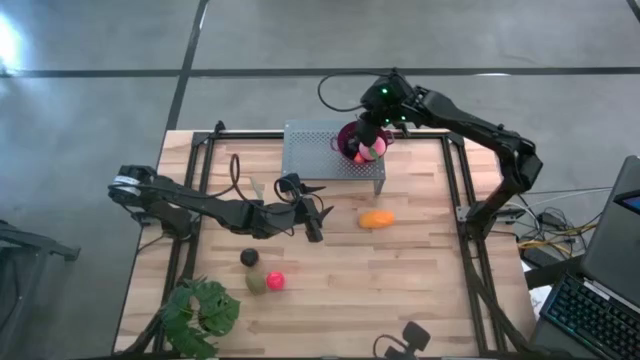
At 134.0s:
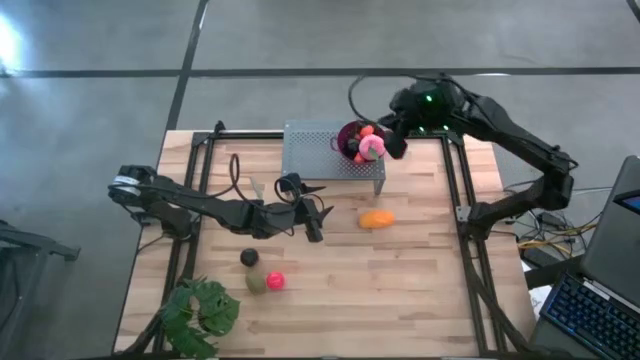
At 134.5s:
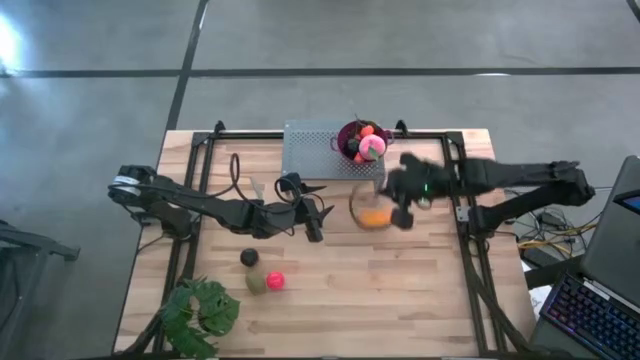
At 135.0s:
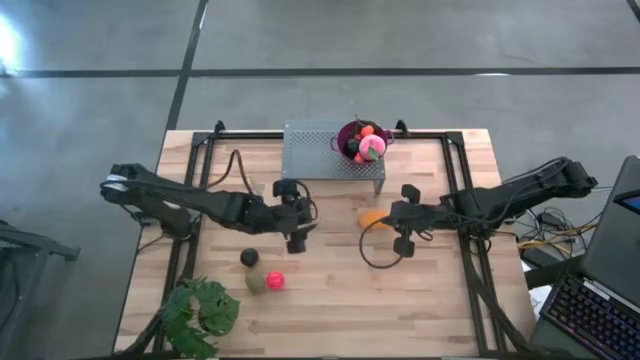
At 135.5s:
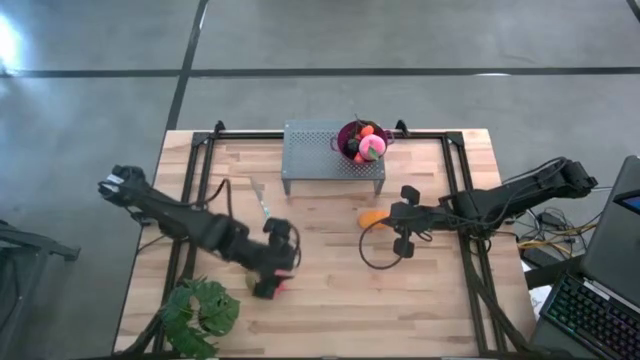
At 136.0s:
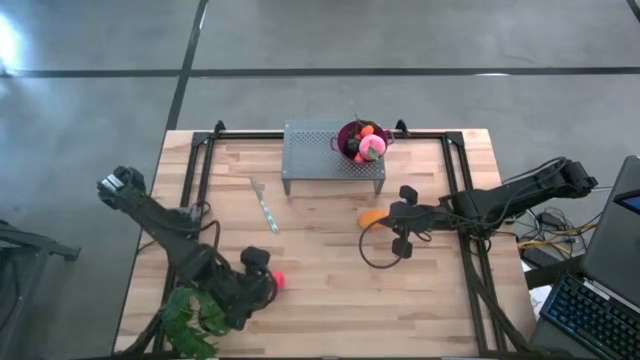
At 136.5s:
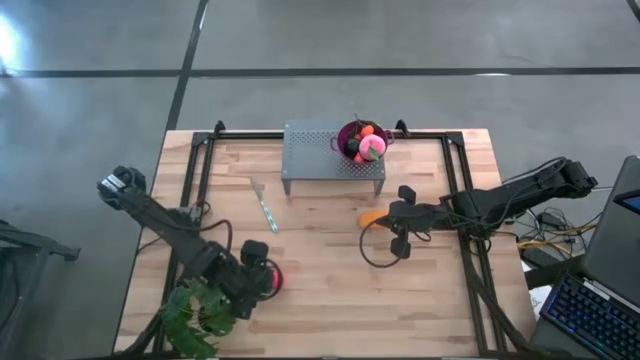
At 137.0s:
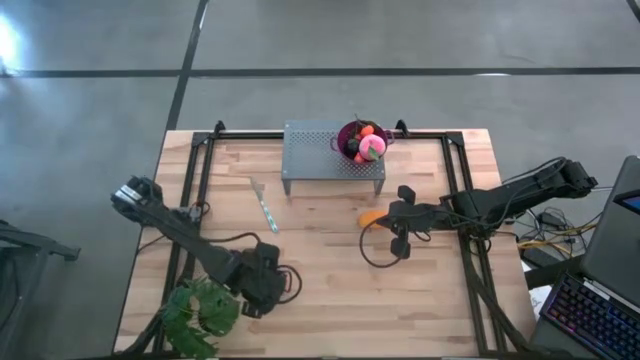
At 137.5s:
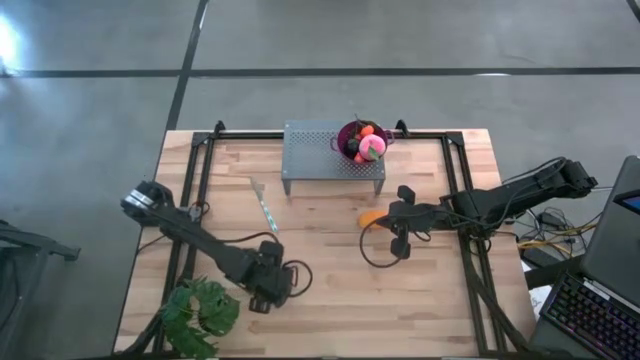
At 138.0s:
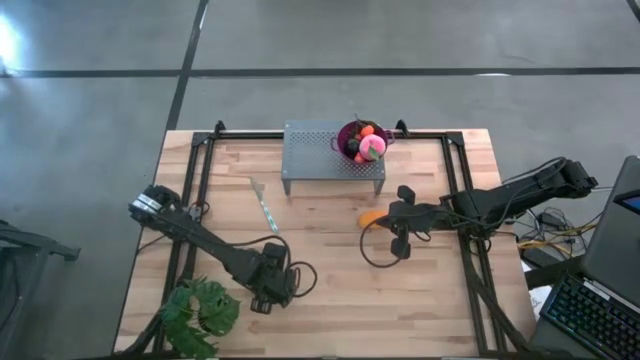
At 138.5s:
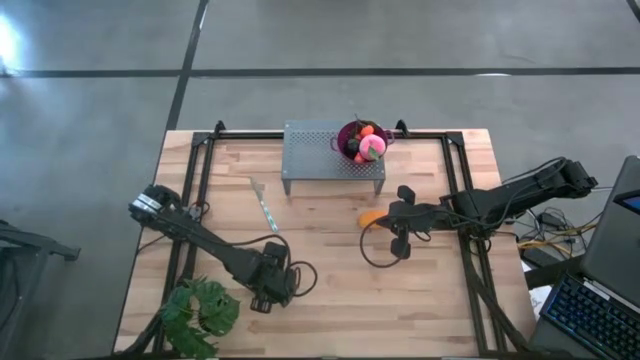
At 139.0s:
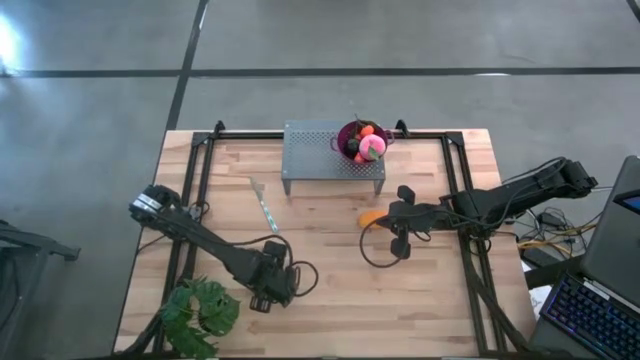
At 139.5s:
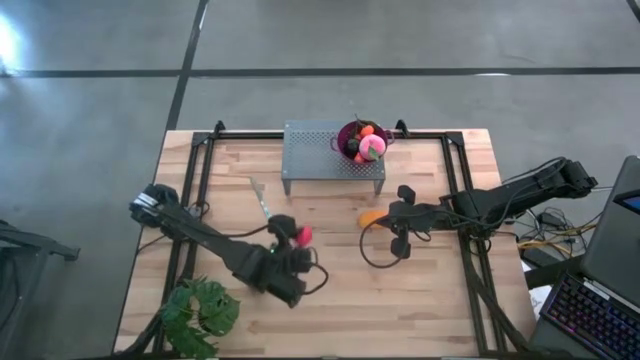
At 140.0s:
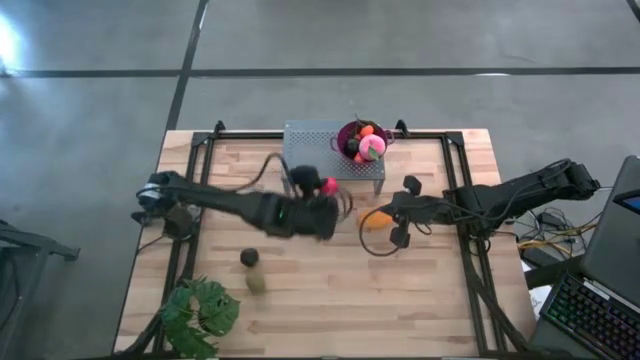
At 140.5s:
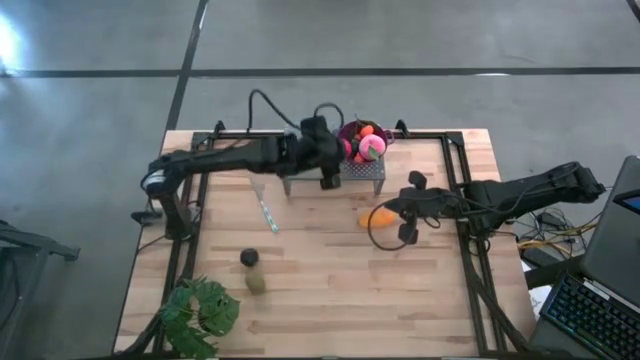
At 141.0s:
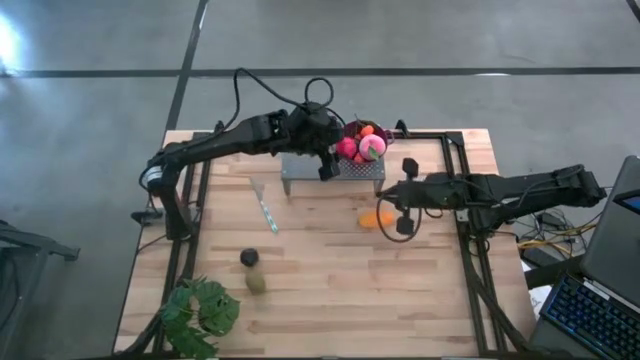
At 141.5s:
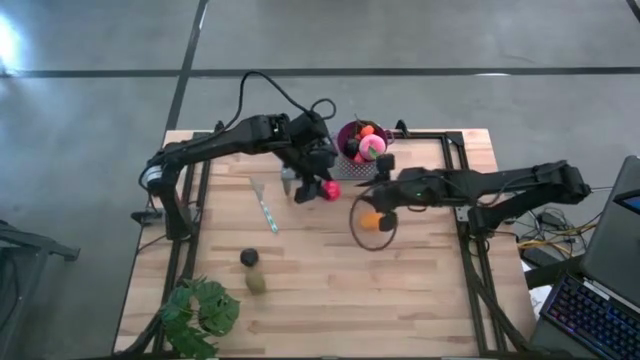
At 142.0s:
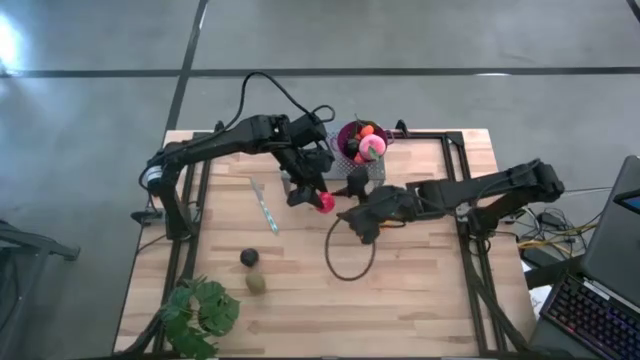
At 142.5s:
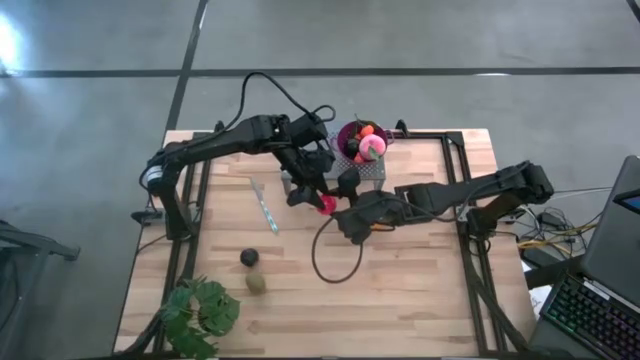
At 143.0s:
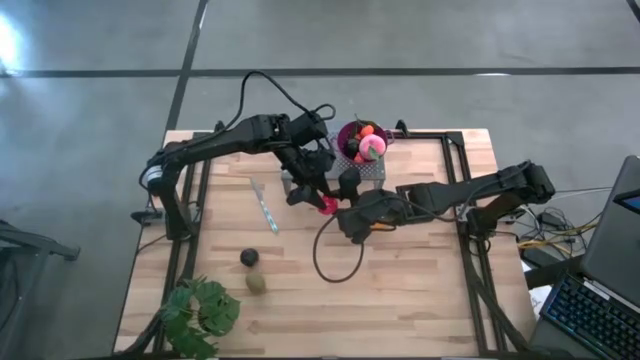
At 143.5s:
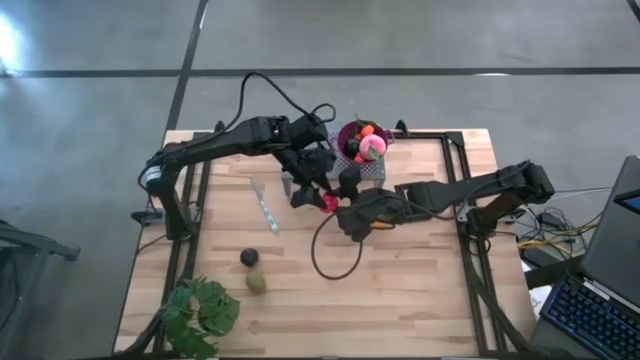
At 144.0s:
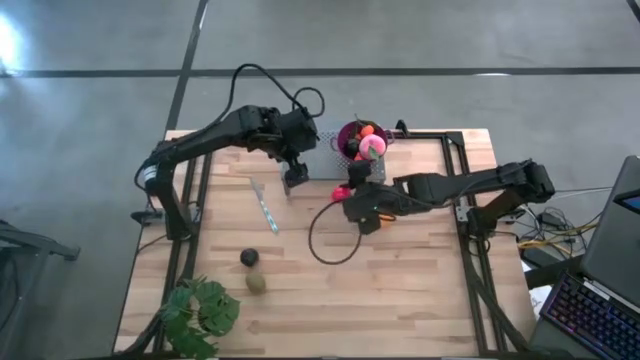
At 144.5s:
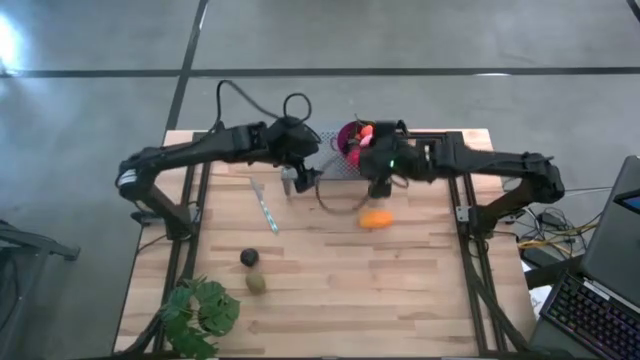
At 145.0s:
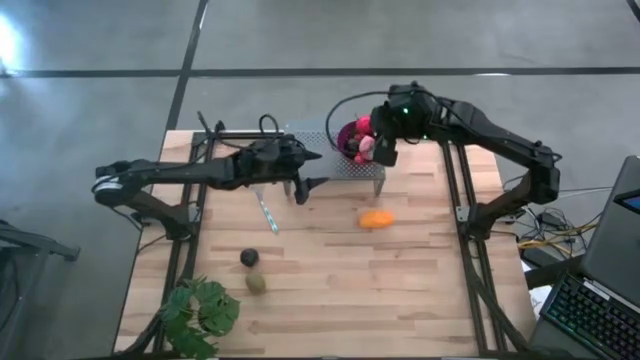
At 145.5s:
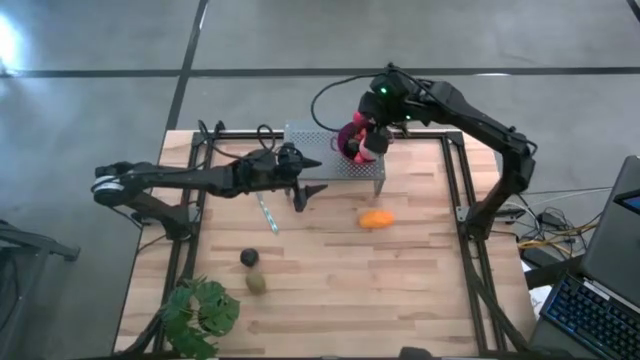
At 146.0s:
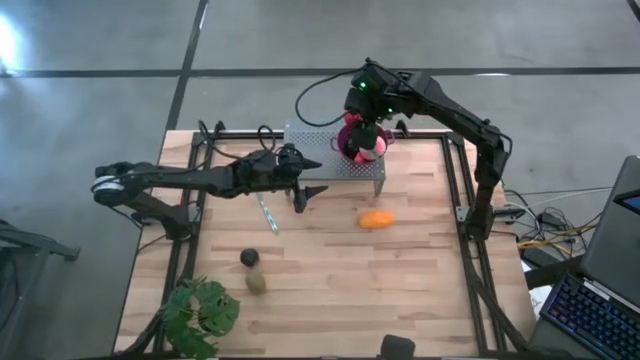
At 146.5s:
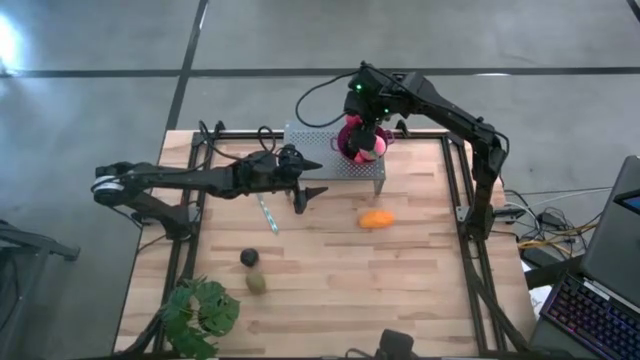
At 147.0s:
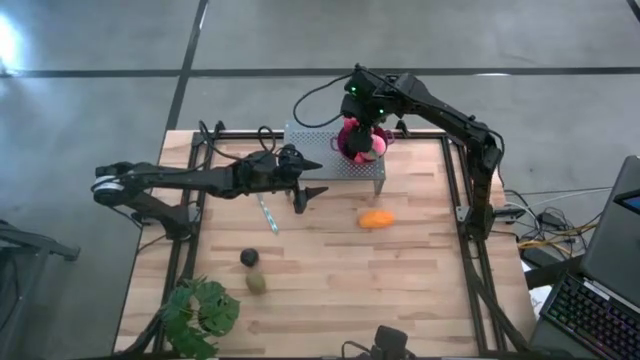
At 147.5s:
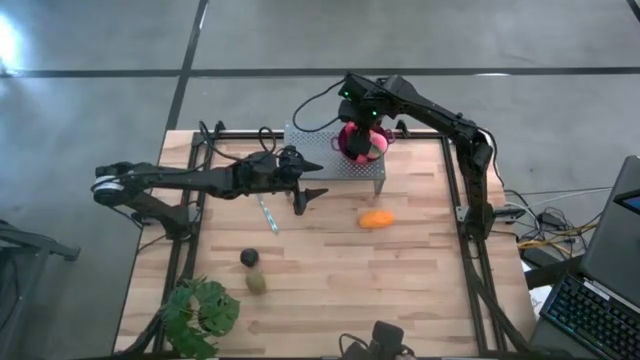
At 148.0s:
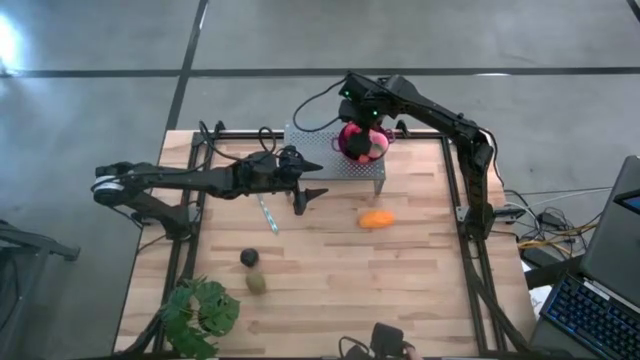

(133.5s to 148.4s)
Task: Pick & Place Fruit
Put the tomato into the purple bowl on the shelf

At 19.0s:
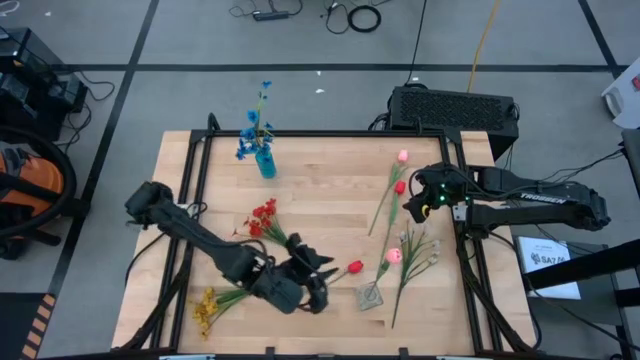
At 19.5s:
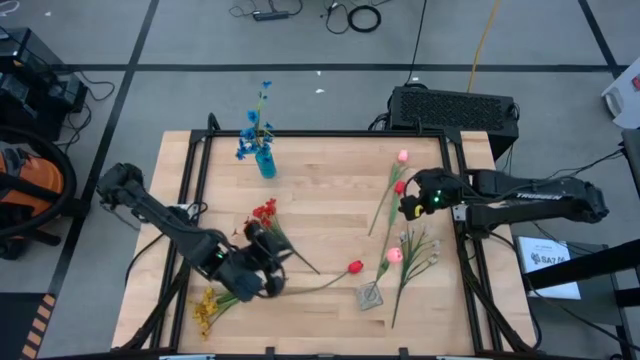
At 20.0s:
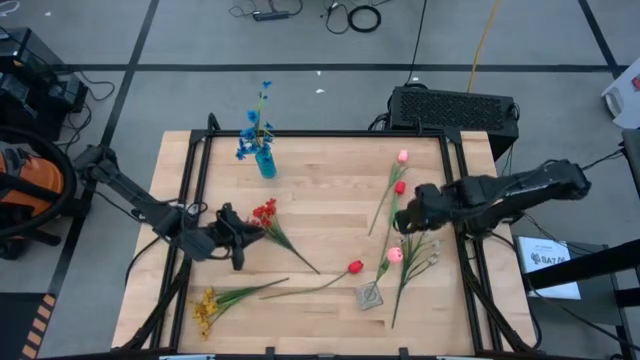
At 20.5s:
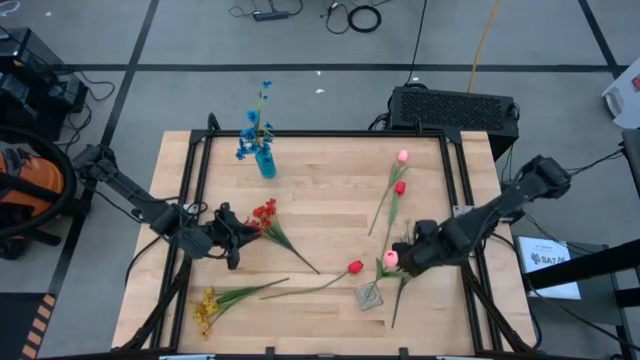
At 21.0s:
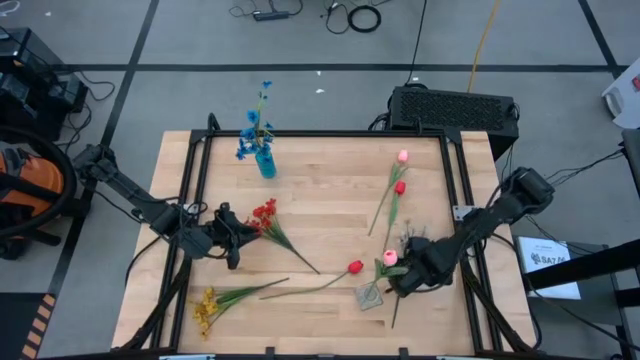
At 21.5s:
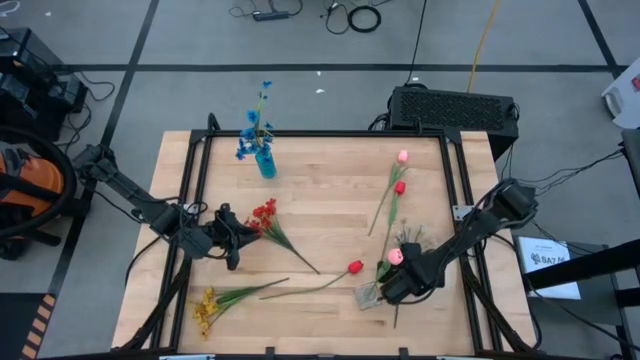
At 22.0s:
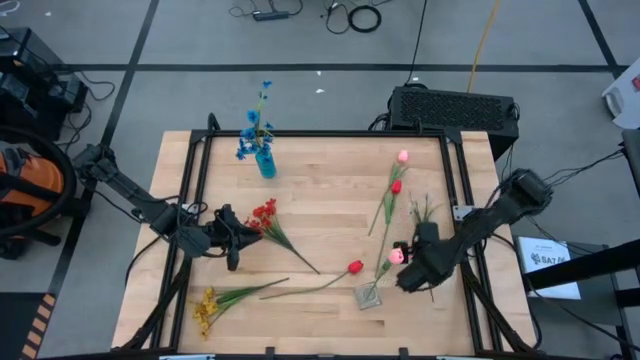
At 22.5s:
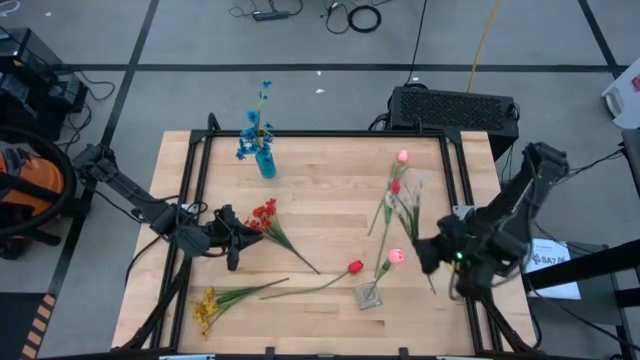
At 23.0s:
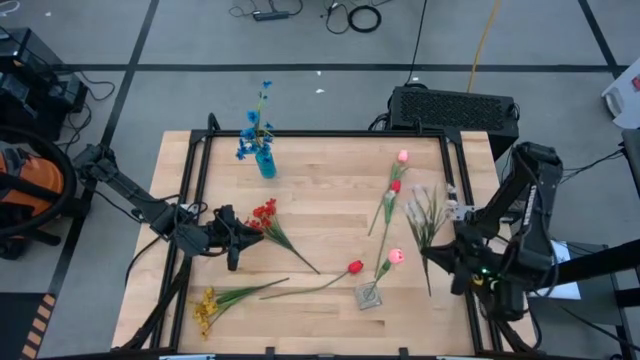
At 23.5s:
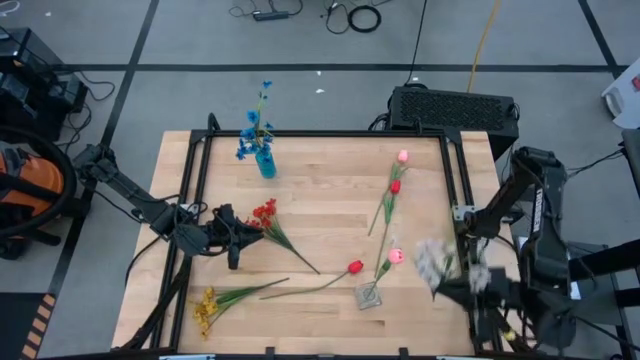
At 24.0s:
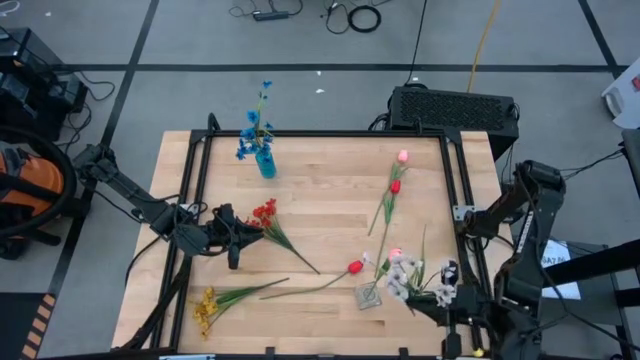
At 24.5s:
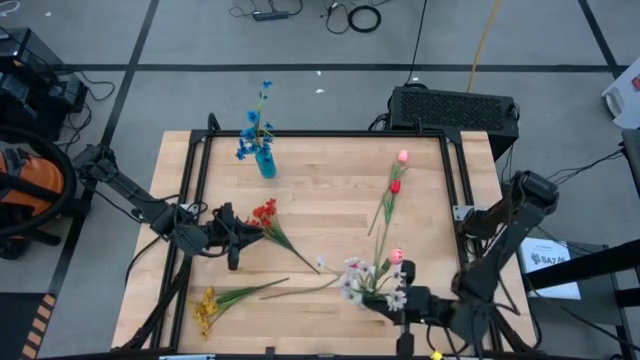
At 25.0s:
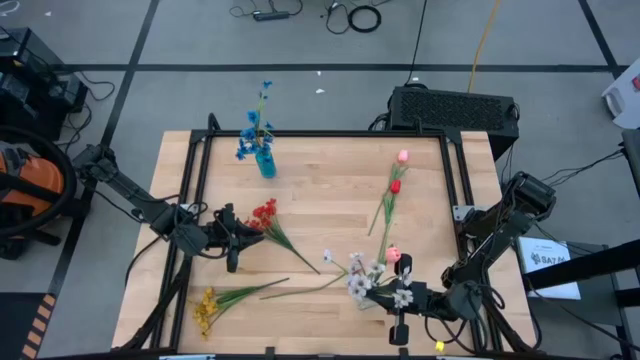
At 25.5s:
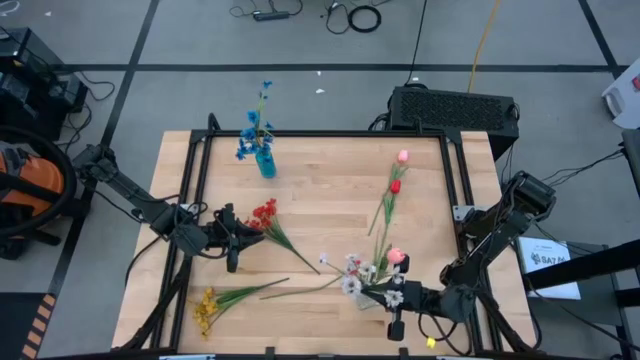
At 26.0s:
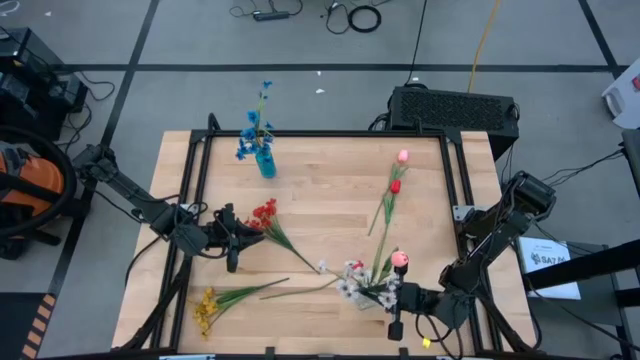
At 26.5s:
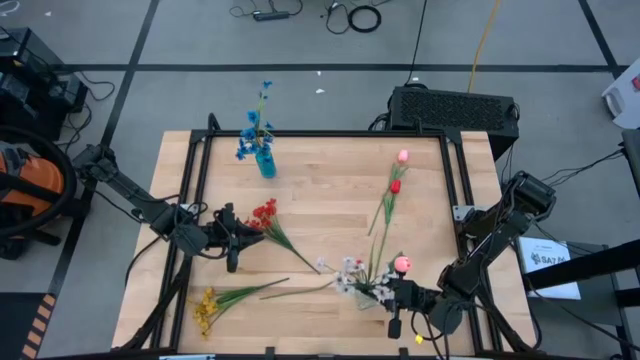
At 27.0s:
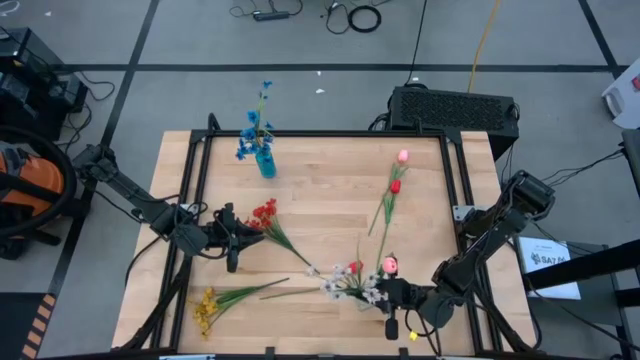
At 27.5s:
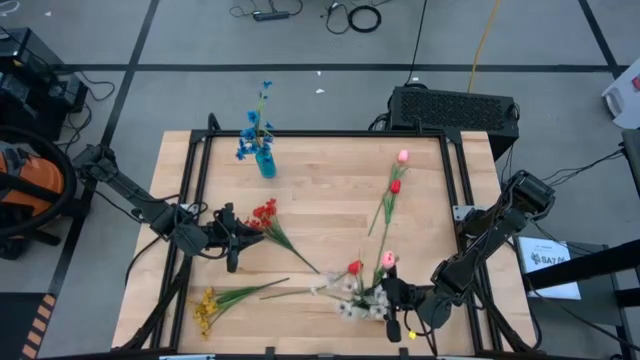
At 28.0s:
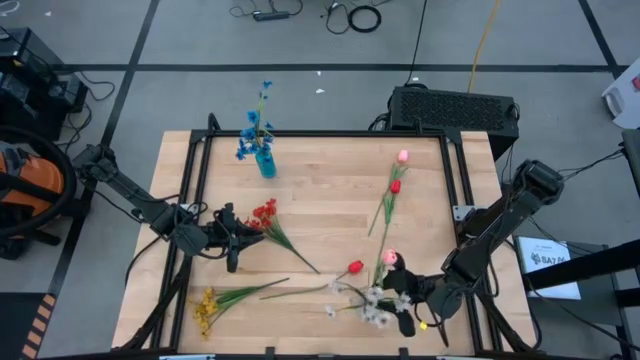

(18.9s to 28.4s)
Task: Sort flowers into vase by color
Put the white flower into the transparent vase
